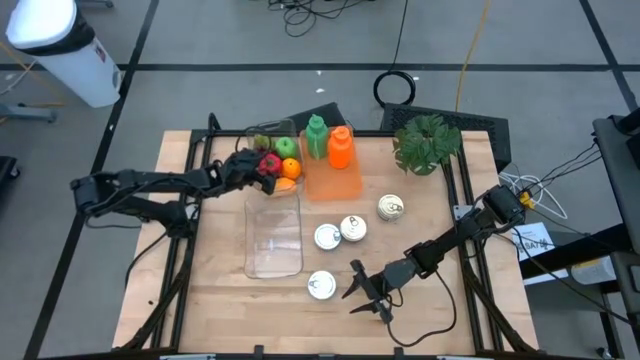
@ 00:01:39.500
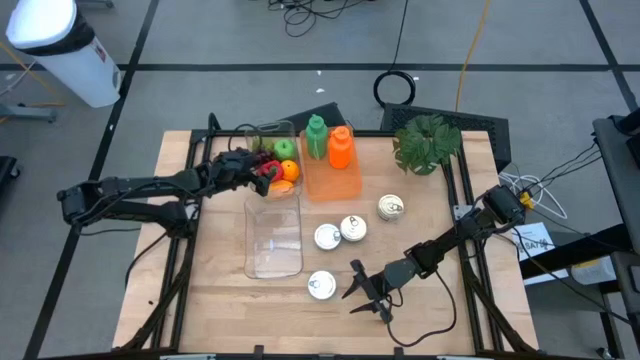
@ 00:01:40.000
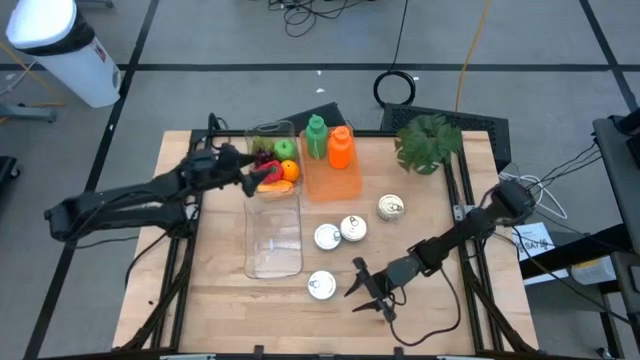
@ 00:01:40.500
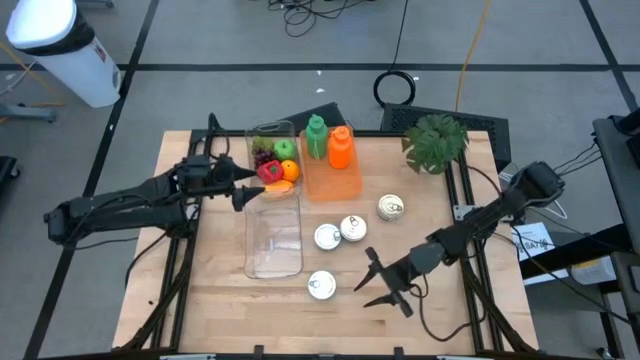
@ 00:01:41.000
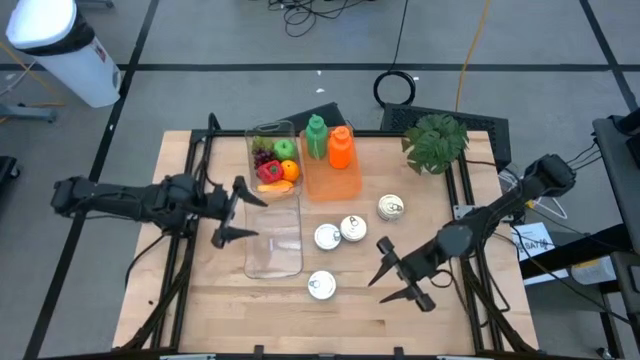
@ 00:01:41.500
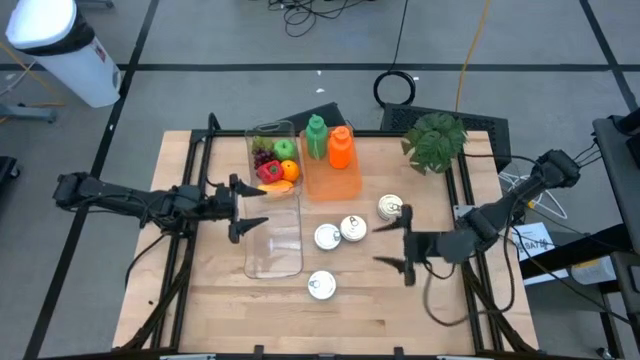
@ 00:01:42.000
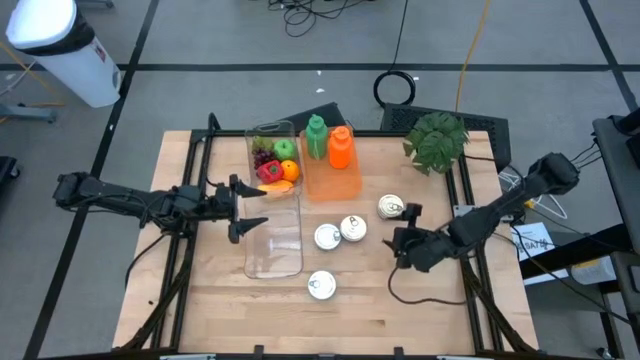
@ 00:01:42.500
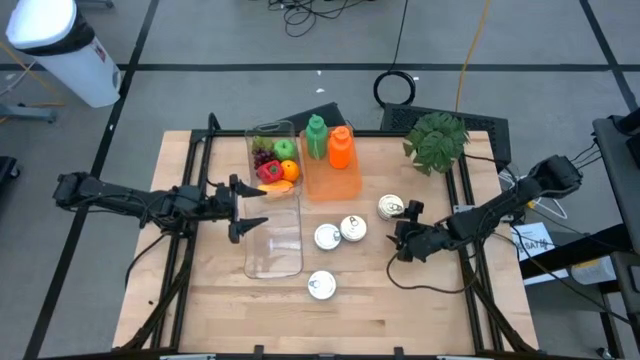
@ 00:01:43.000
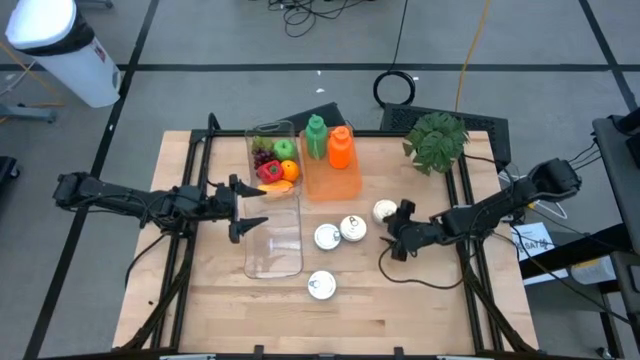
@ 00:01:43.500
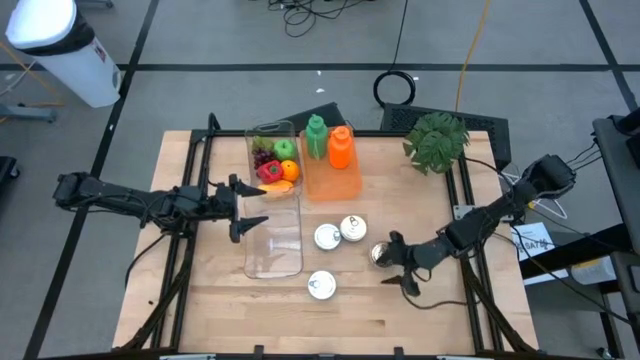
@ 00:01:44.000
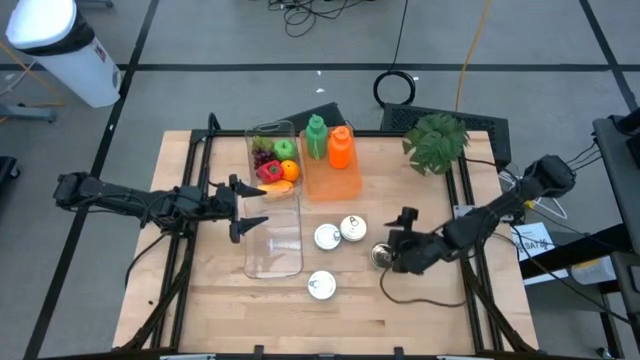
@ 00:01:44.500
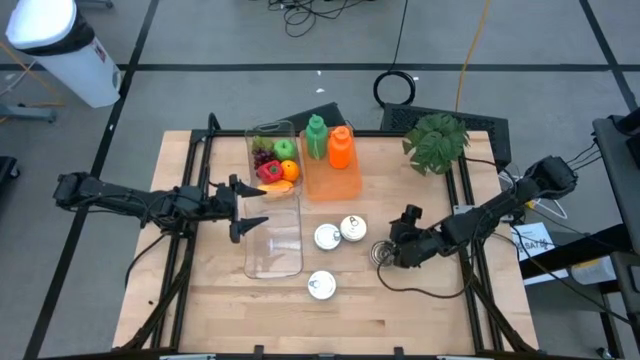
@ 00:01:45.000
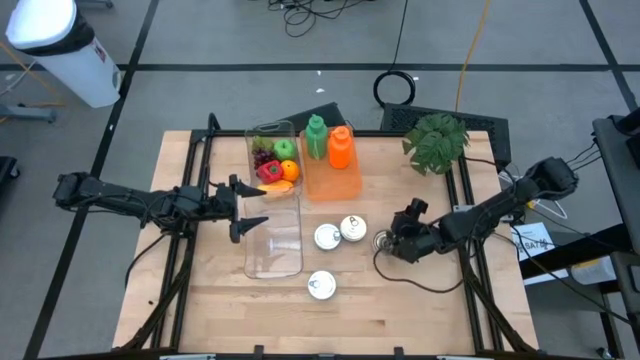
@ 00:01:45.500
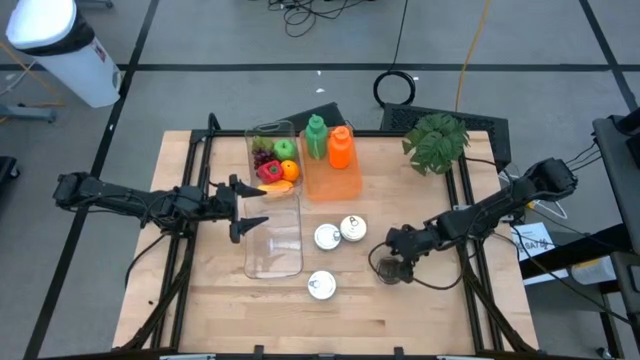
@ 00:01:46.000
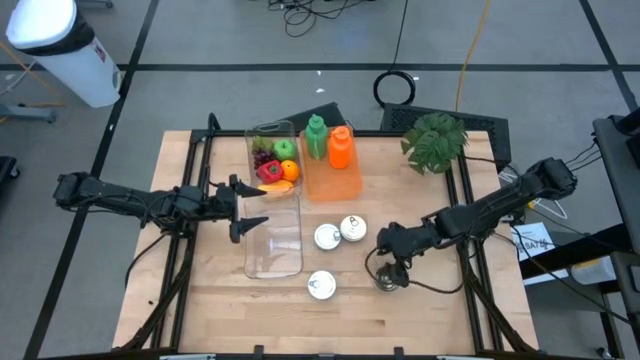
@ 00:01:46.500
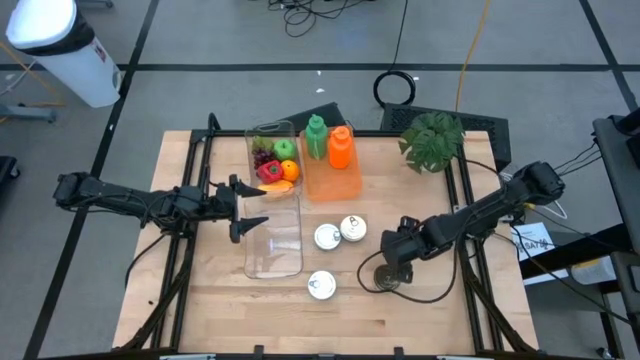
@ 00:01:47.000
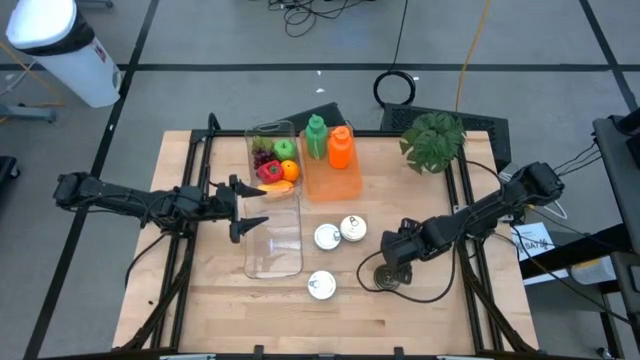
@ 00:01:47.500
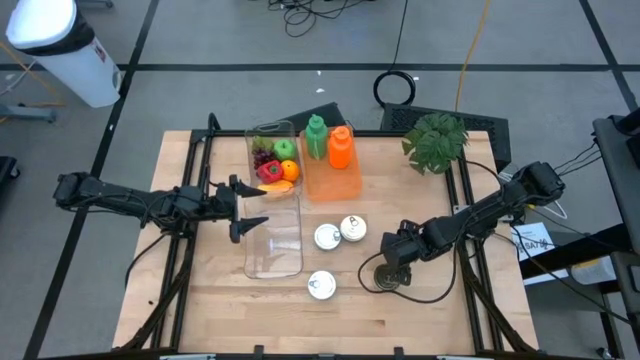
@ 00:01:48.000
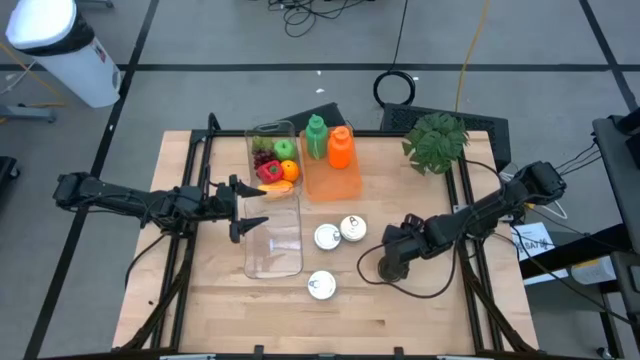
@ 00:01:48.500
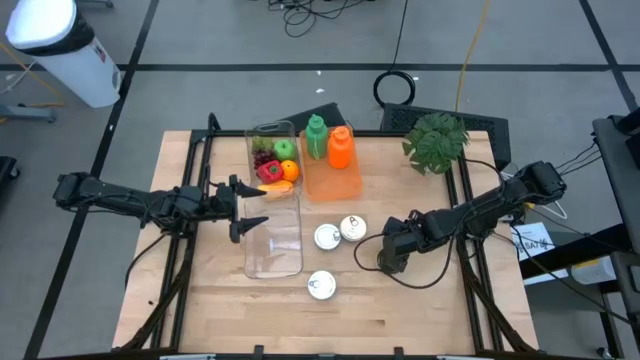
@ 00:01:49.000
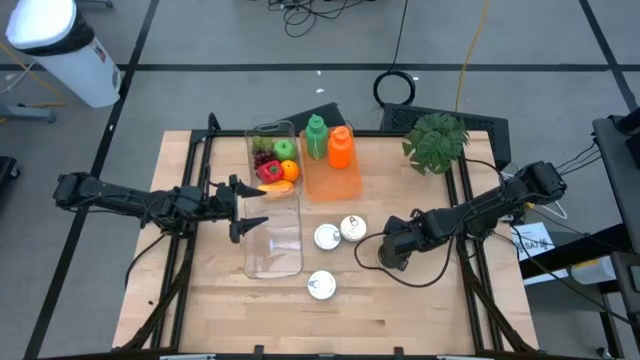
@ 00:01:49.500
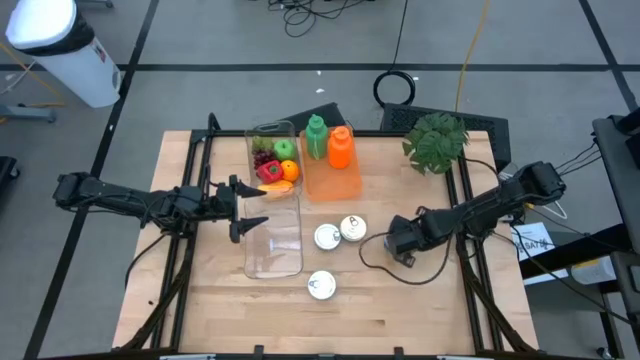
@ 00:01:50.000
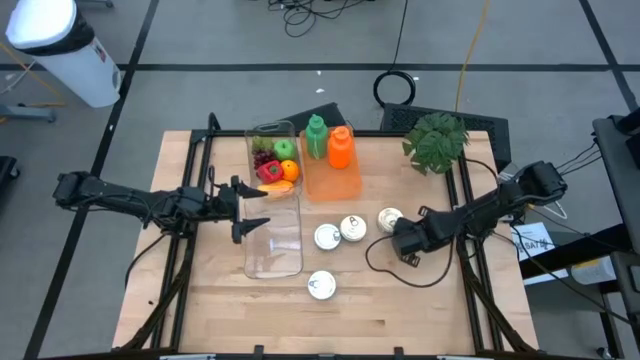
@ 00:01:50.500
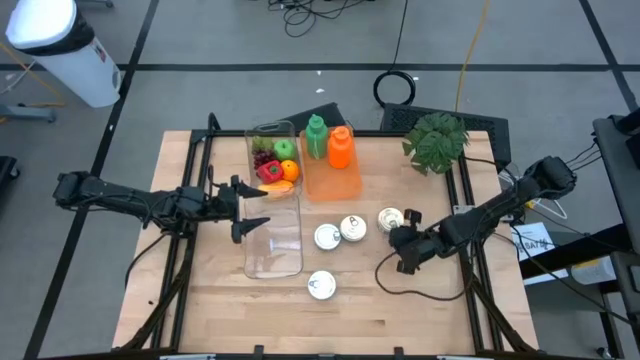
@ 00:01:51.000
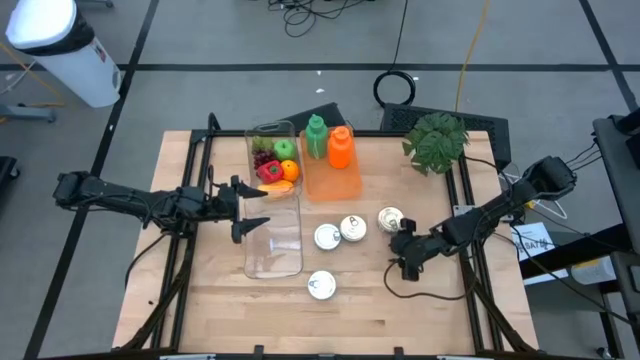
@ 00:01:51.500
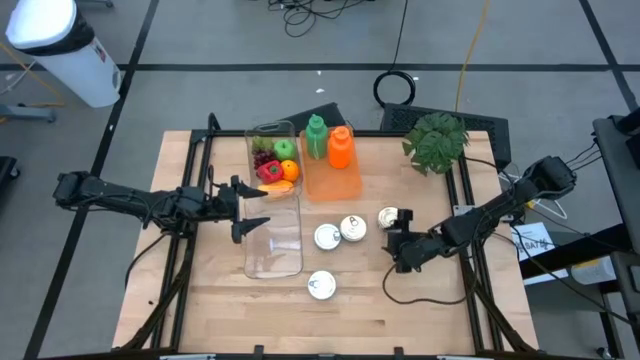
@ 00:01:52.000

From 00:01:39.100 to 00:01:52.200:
Task: Pick & Place Food Item
Put the right blue pink tuna can into the bottom transparent bin

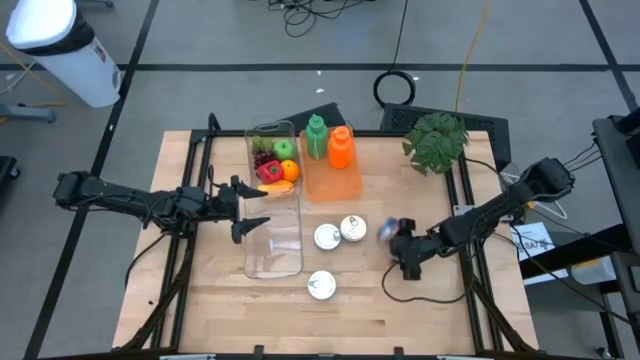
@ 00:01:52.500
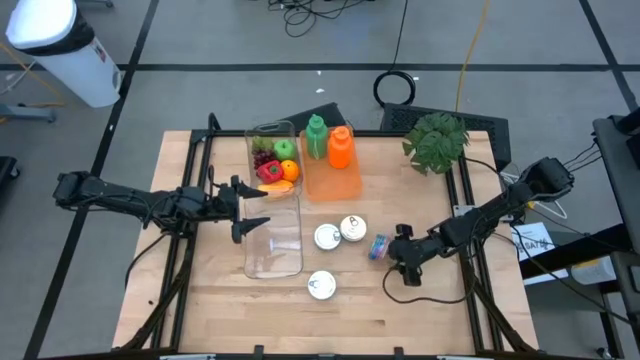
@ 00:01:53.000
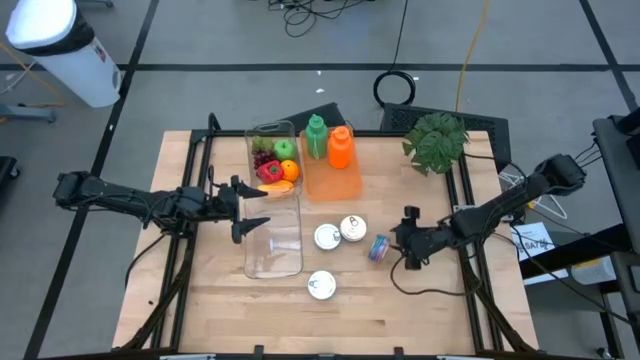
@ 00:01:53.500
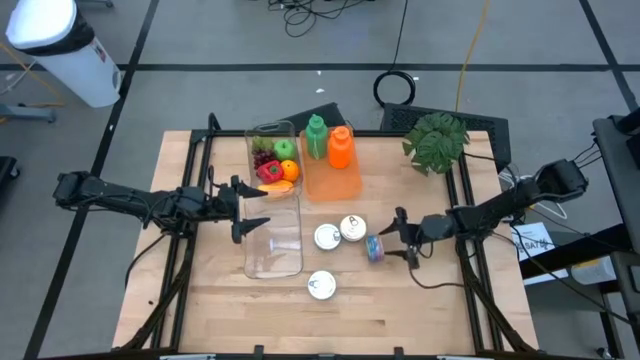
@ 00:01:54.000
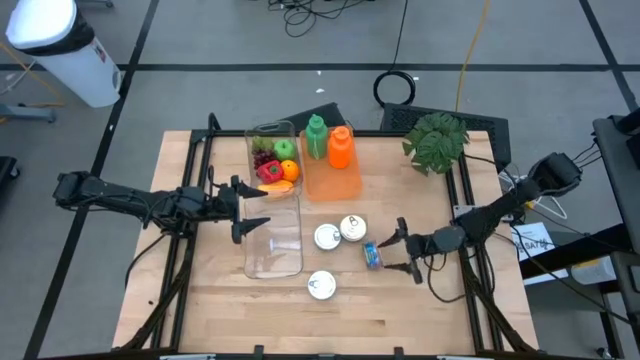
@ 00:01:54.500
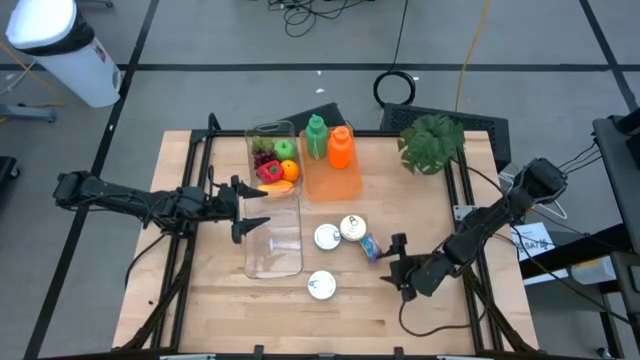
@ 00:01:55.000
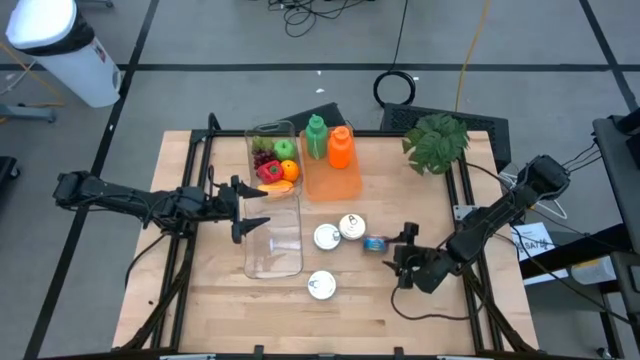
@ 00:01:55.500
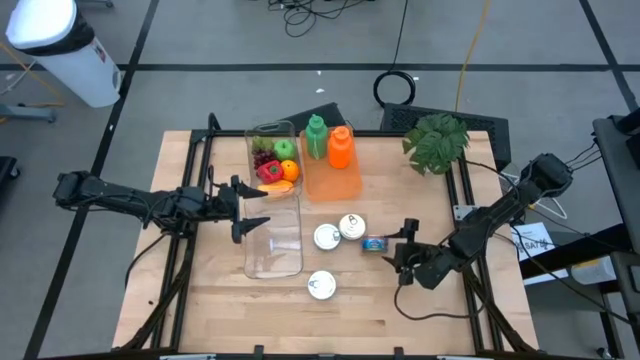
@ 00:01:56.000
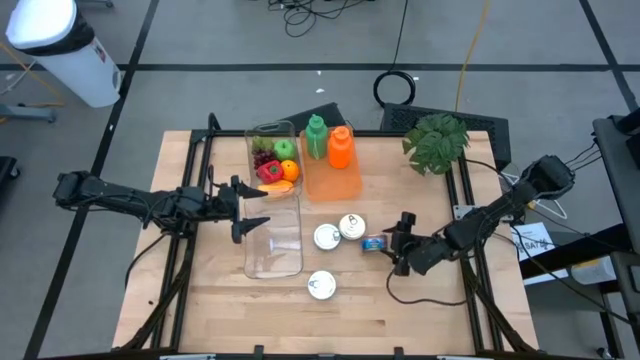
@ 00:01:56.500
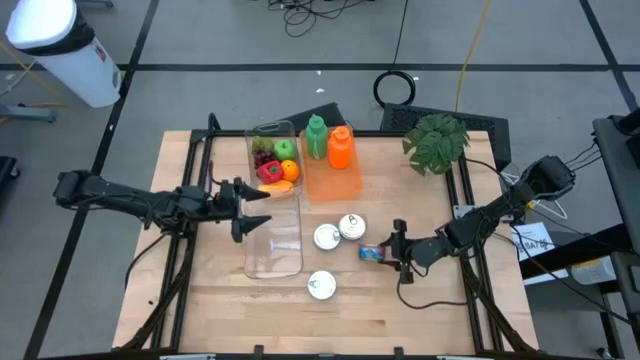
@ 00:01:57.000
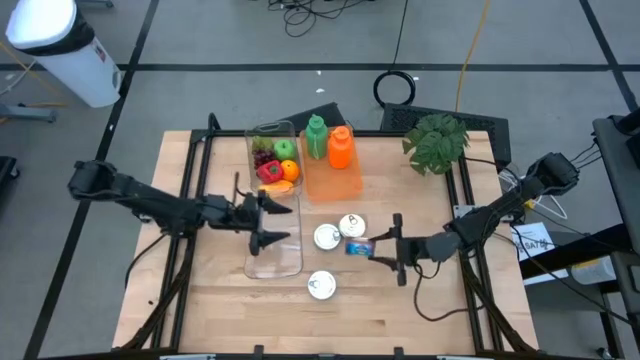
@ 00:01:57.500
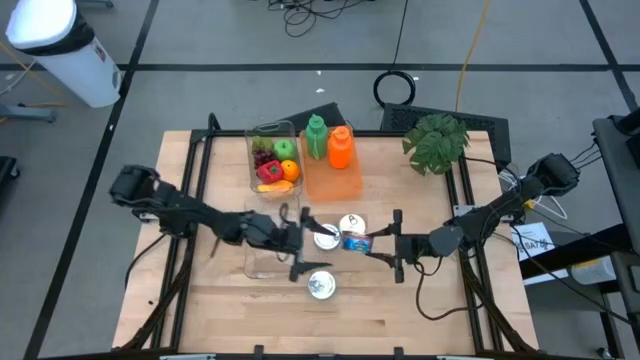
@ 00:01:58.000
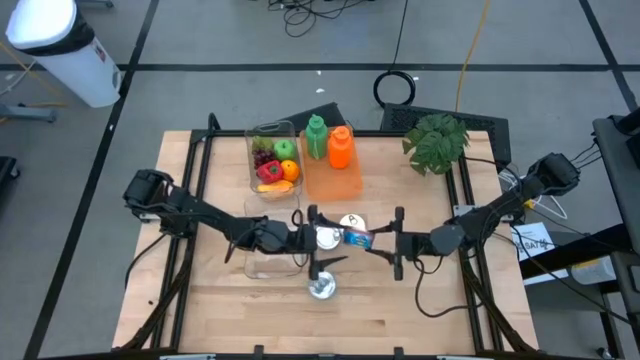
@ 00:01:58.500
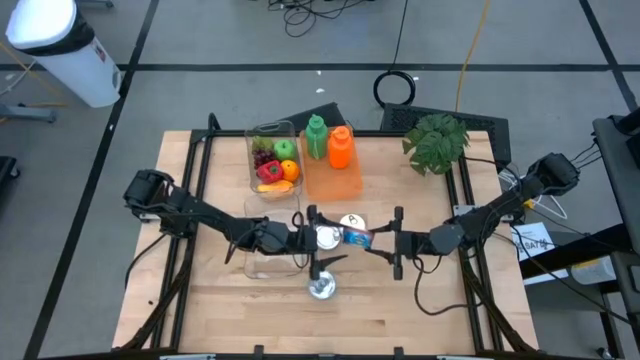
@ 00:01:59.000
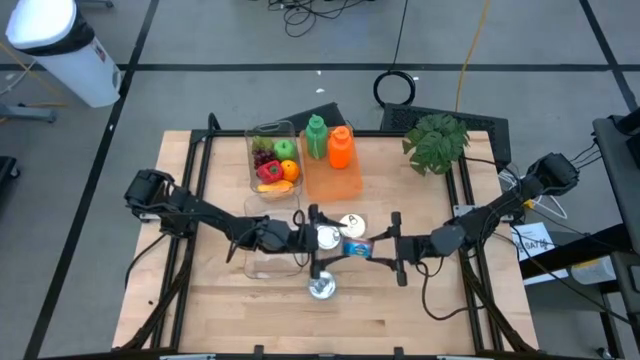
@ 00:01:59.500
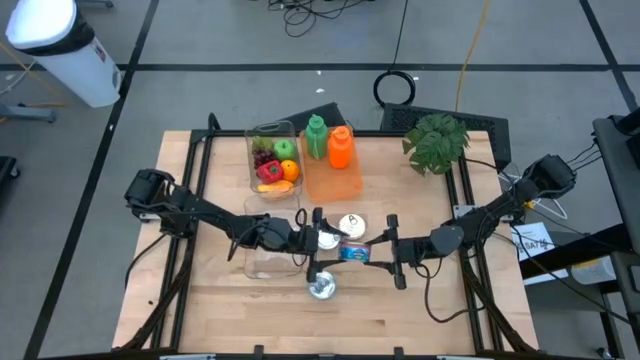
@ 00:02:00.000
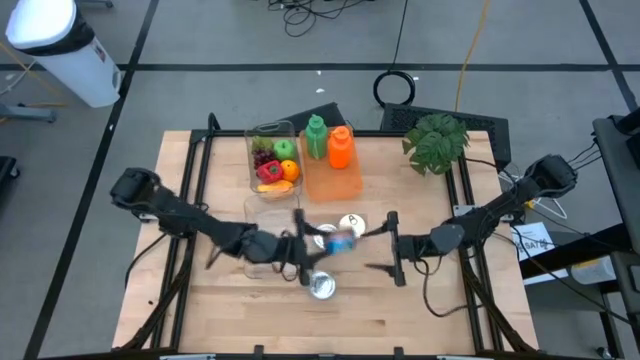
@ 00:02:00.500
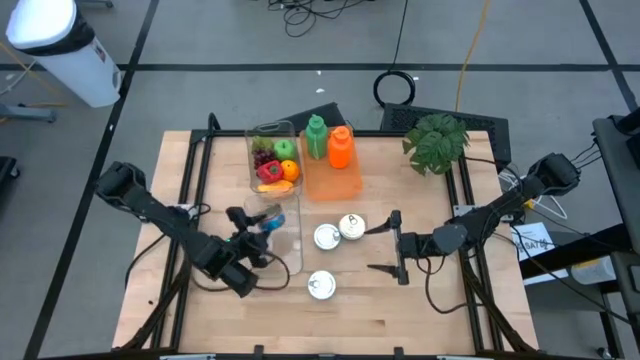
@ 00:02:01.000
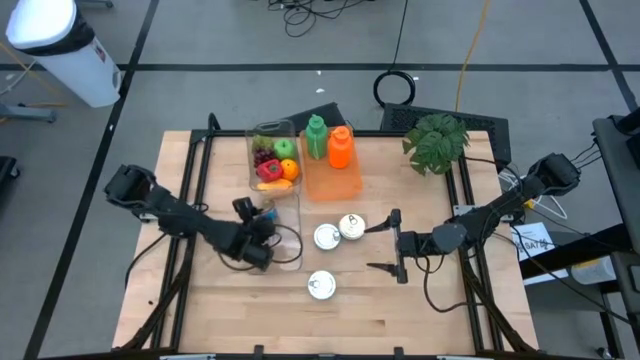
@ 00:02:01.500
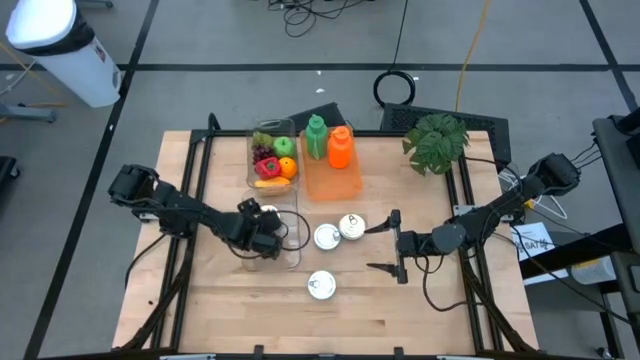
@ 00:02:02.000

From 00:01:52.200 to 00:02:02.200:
Put the right blue pink tuna can into the bottom transparent bin
